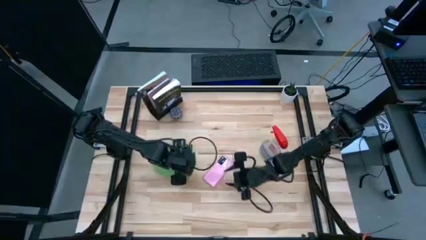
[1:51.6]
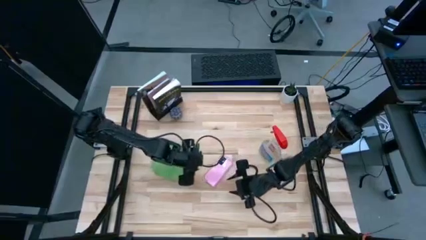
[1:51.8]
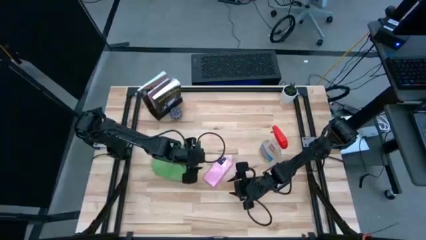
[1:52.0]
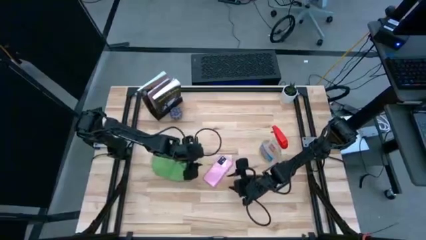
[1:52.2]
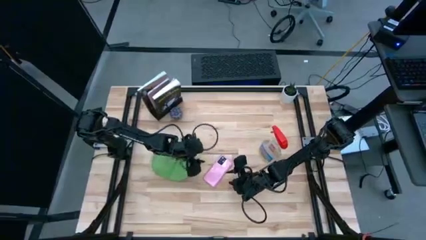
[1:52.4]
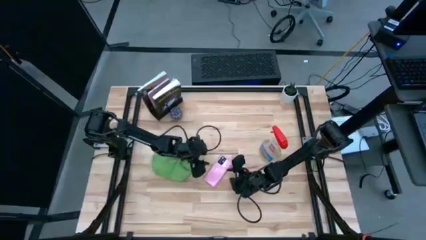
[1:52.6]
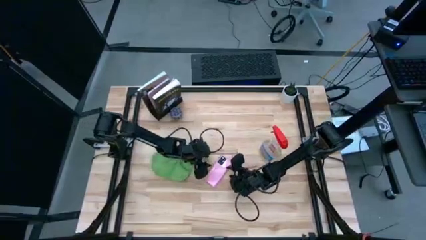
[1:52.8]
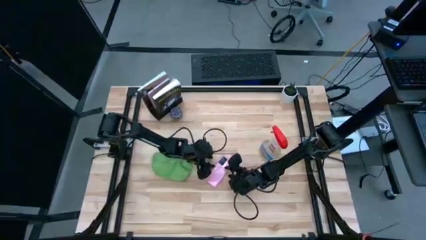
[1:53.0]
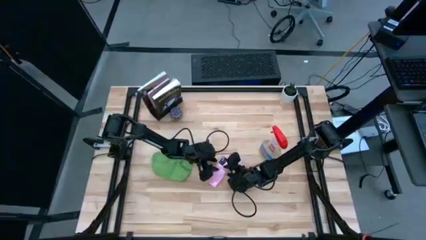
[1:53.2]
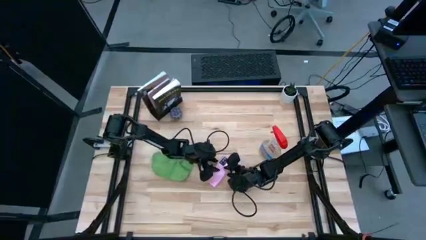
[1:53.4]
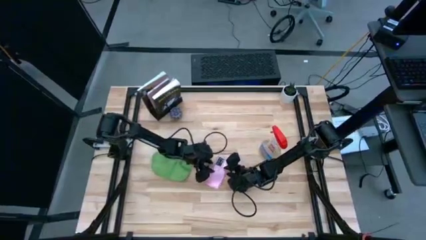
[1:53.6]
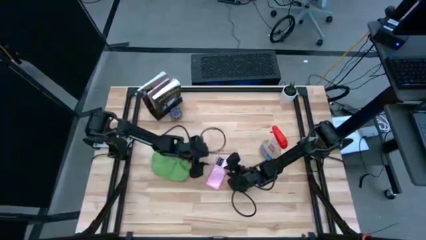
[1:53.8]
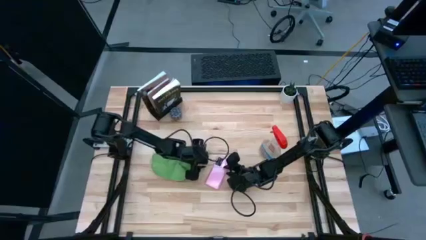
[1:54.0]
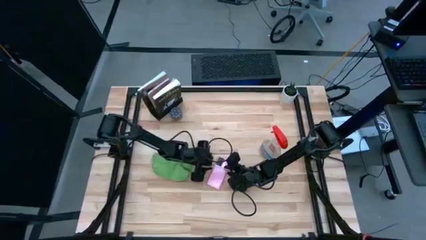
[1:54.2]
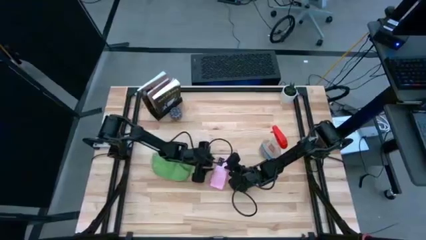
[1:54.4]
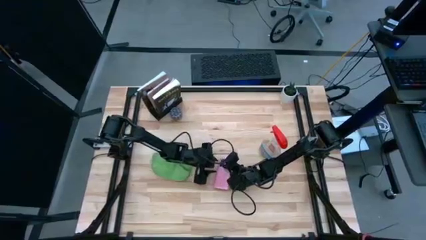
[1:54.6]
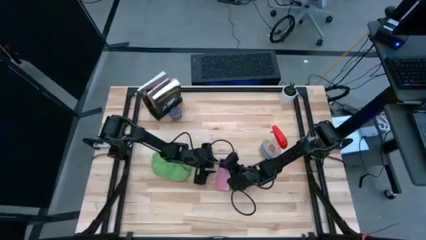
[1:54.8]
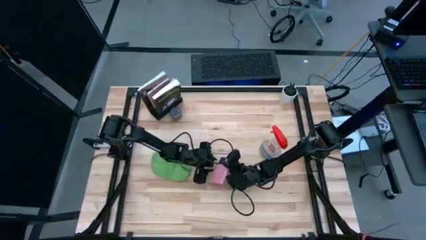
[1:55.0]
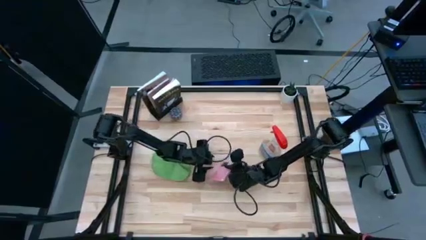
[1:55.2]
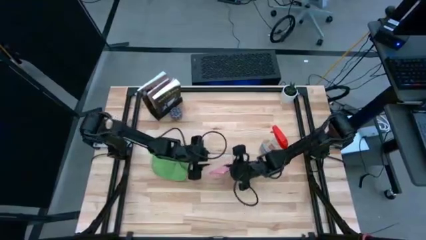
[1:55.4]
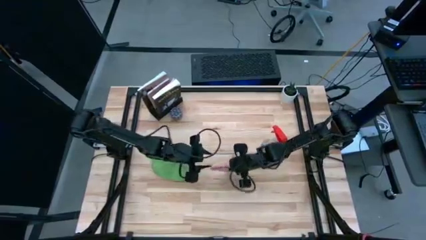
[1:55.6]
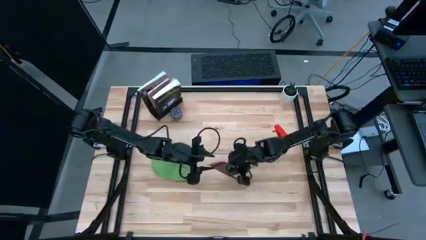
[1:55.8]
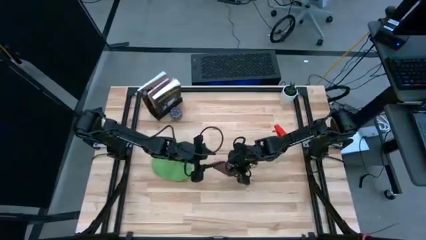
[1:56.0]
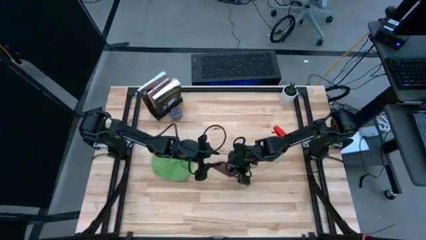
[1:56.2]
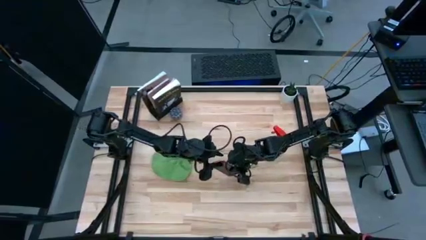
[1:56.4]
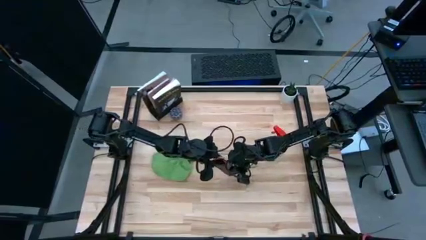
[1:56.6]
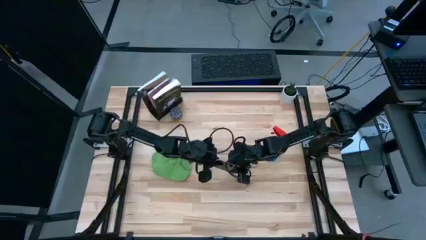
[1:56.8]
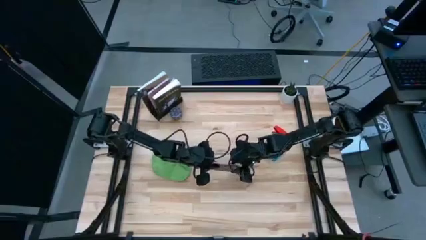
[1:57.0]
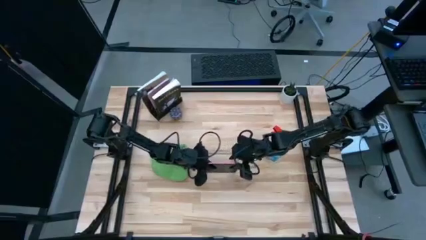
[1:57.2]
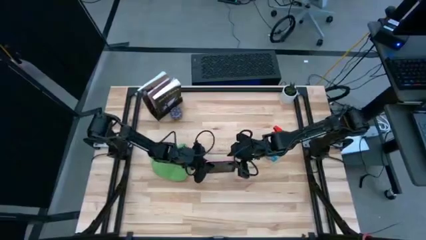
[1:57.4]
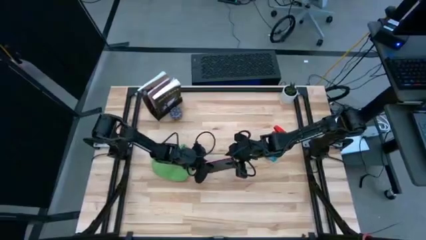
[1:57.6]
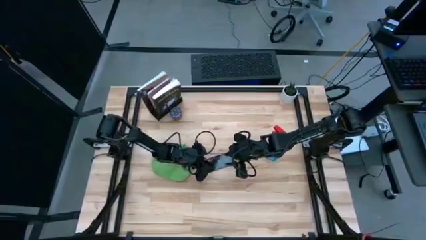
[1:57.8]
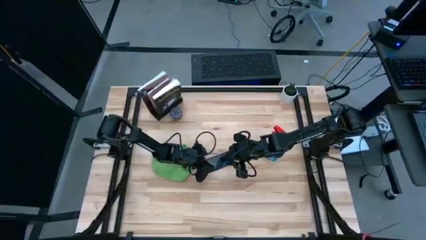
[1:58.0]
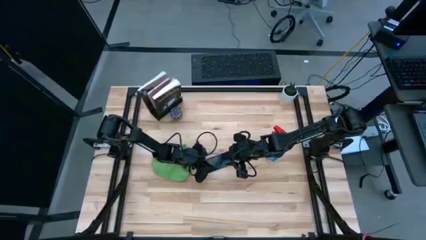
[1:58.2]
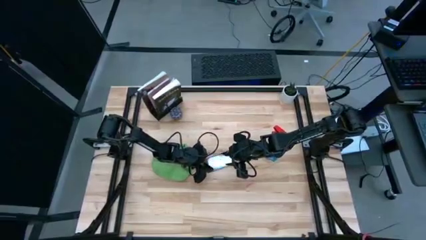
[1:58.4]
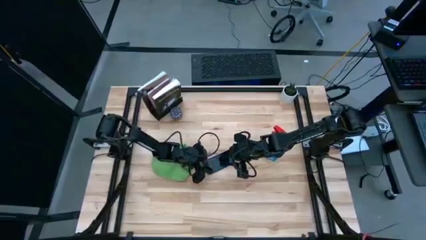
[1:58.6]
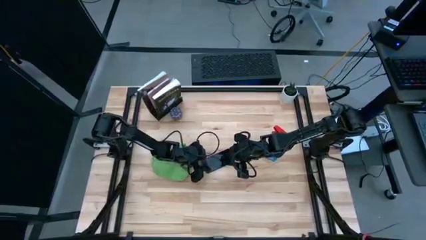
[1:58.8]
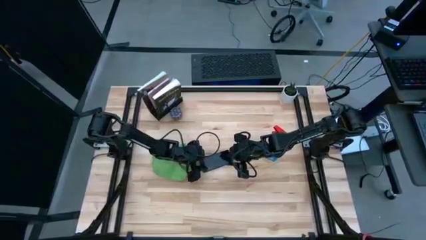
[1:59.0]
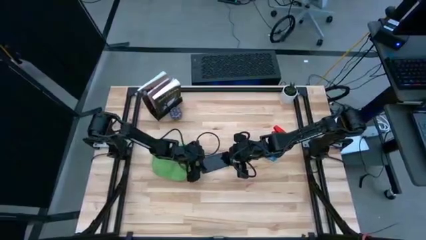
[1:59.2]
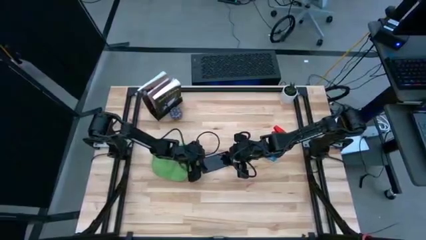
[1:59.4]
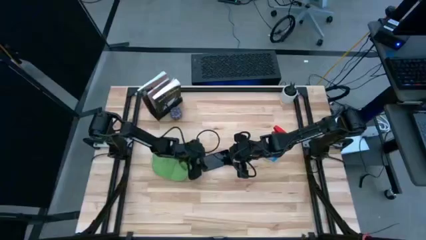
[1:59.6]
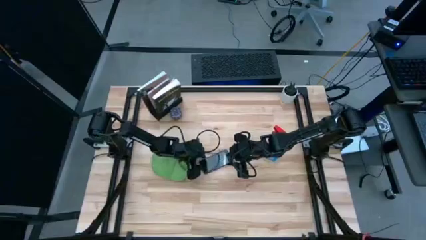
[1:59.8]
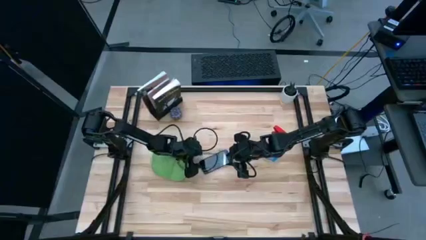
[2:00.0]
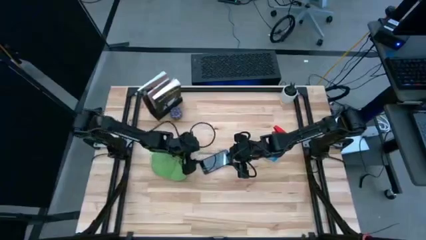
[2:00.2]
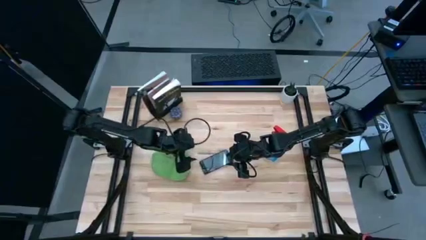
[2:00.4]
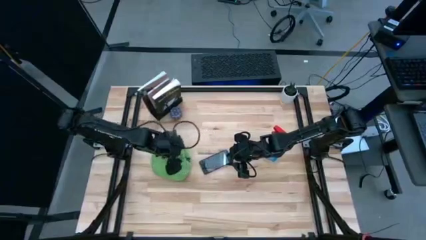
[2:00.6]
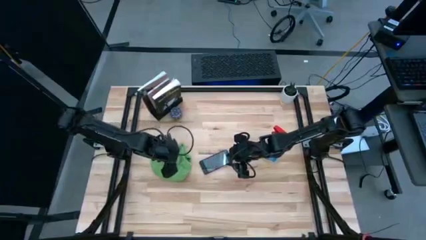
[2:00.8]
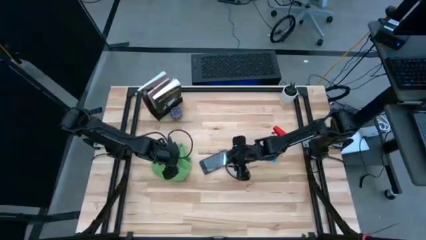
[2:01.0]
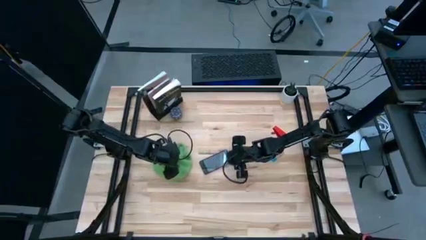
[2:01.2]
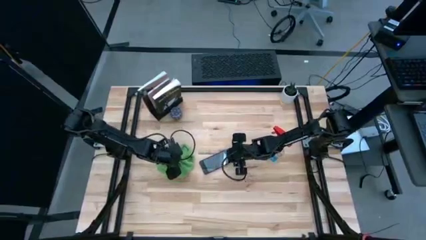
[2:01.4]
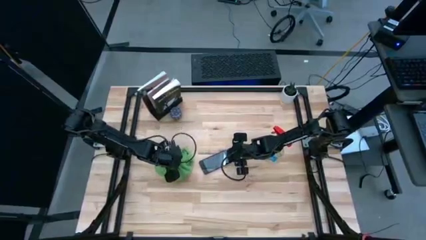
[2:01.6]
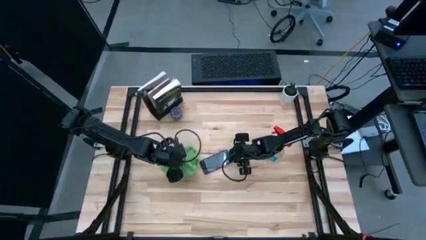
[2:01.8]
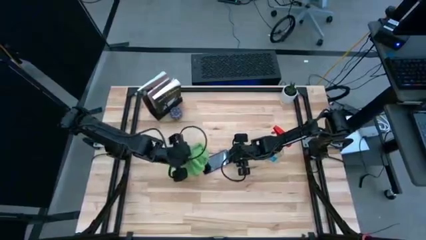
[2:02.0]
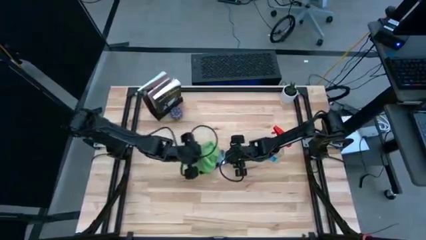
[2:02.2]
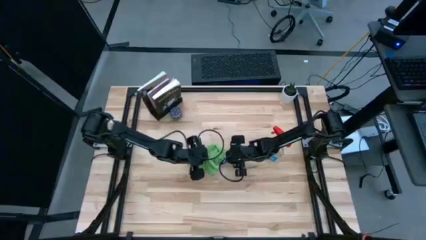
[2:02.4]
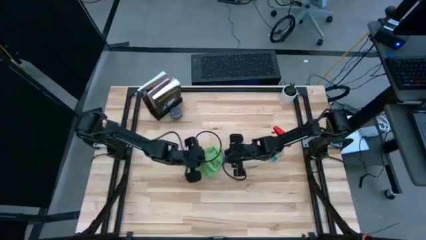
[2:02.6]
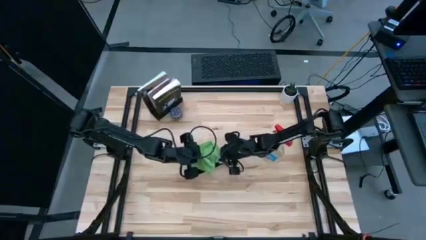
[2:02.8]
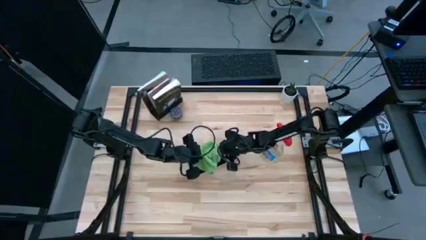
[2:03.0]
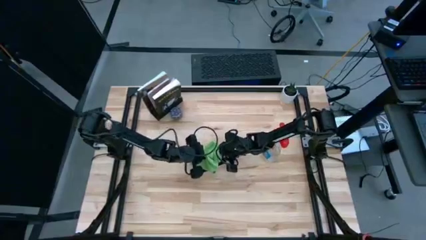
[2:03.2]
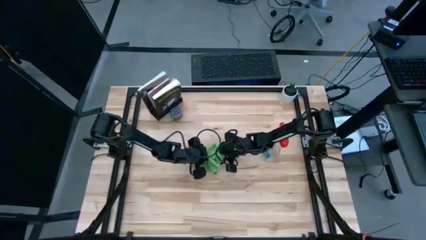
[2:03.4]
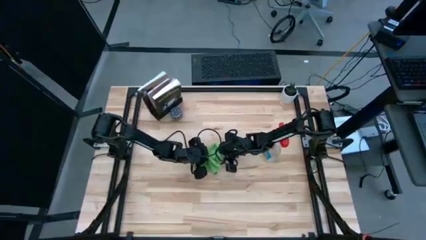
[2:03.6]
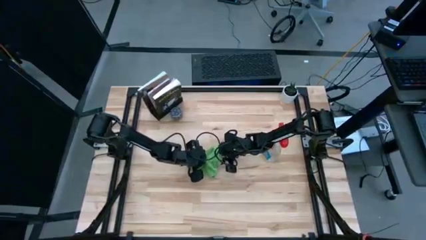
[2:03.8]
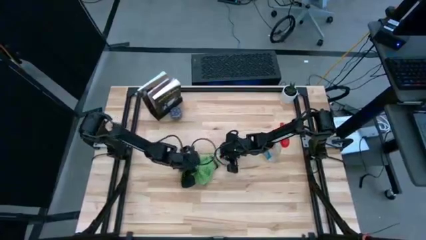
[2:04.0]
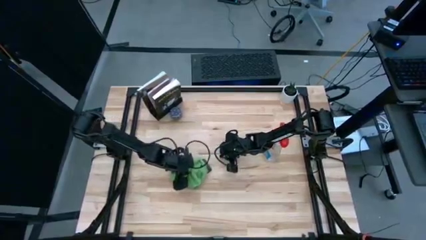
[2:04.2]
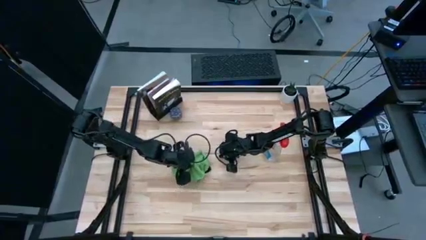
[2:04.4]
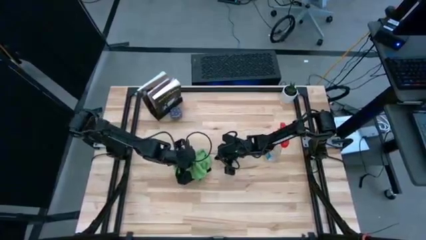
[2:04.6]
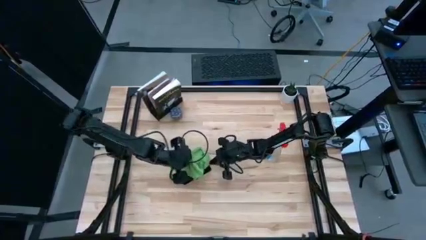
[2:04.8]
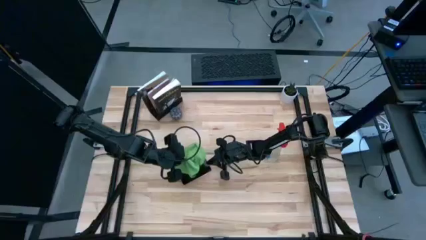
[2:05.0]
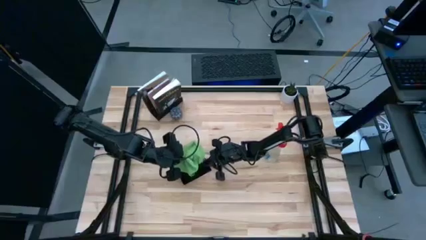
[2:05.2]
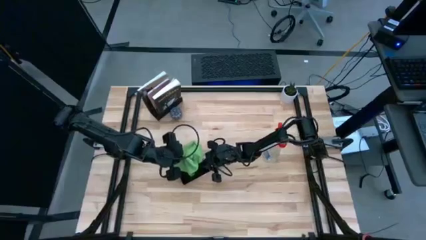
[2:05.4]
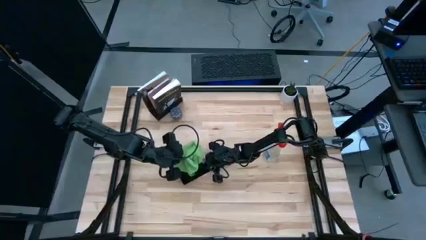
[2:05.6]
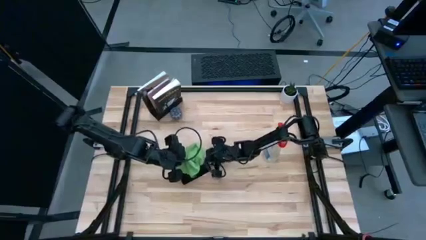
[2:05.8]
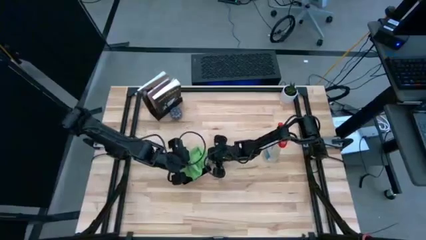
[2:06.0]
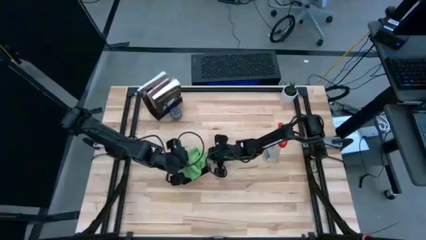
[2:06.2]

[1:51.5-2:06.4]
Task: Apply microfiber cloth
Wipe the front of the pink cellphone with the green microfiber cloth
